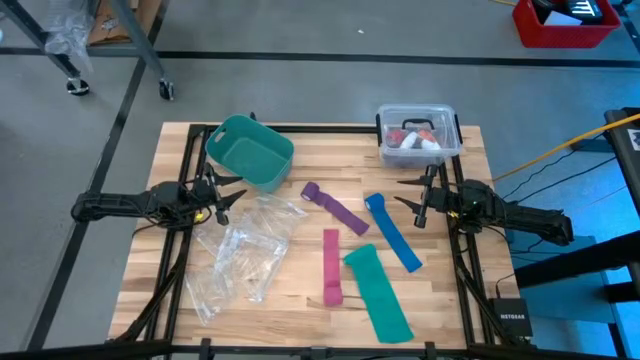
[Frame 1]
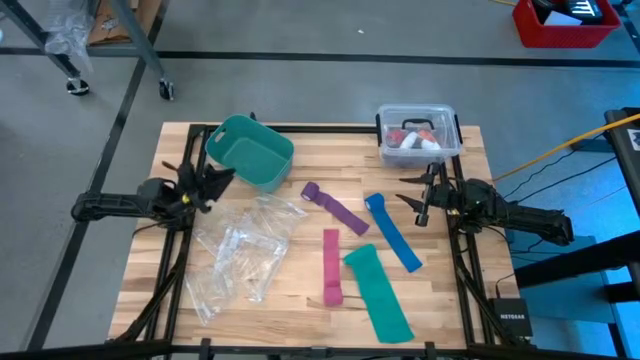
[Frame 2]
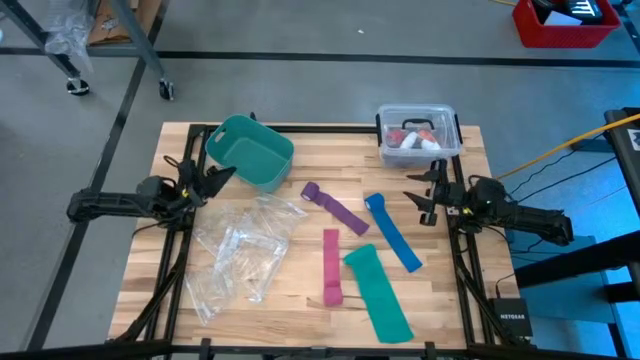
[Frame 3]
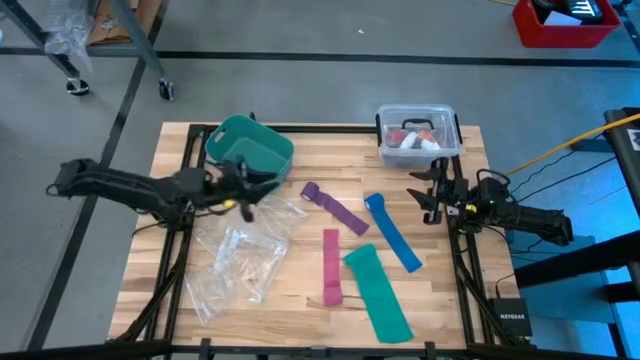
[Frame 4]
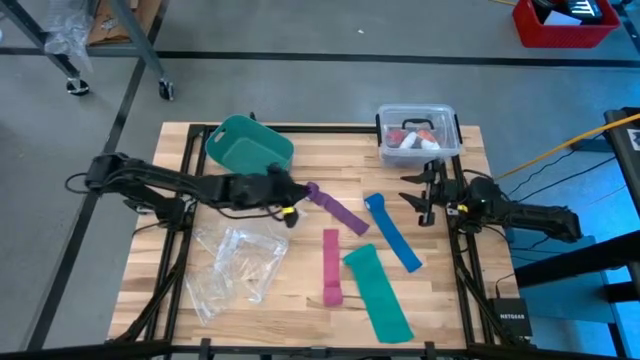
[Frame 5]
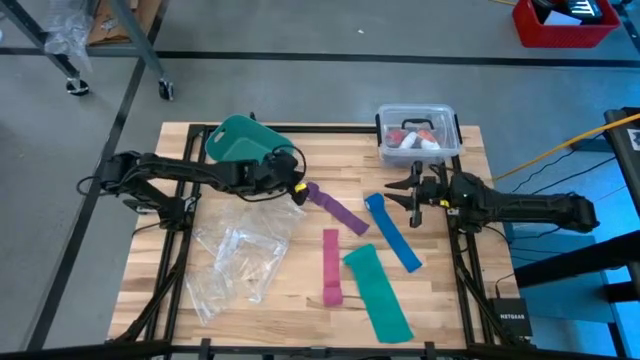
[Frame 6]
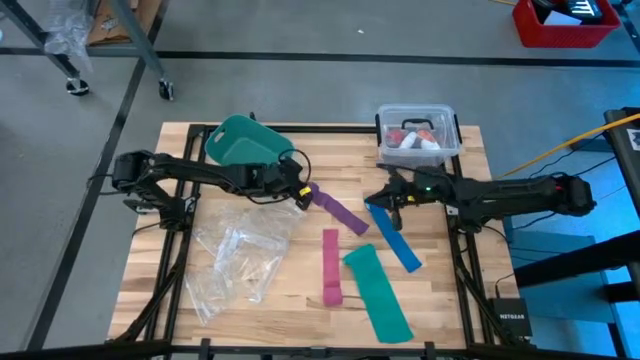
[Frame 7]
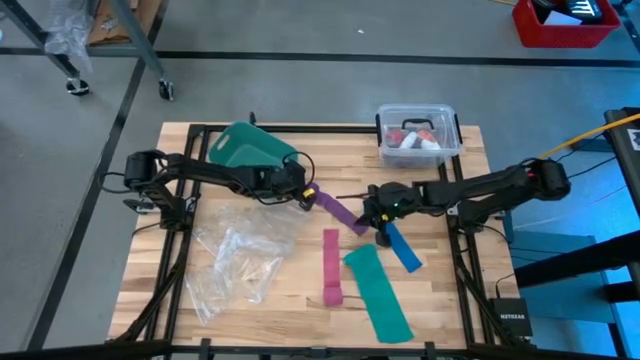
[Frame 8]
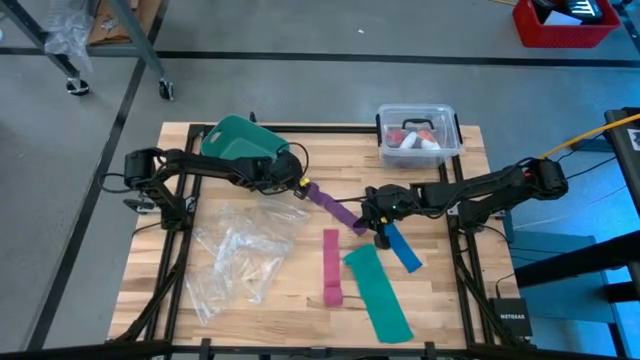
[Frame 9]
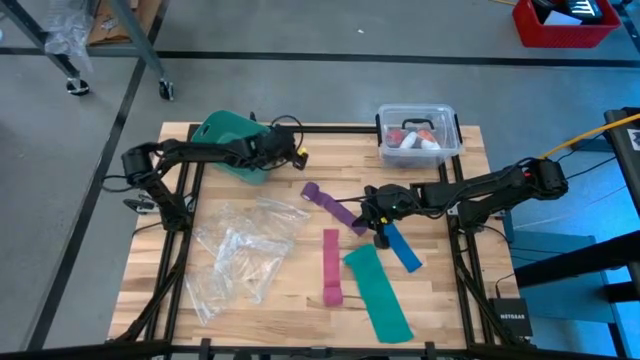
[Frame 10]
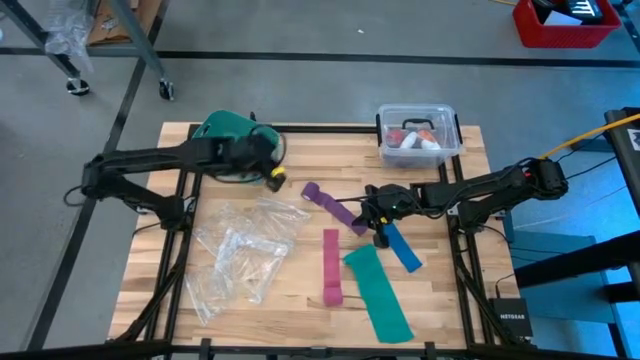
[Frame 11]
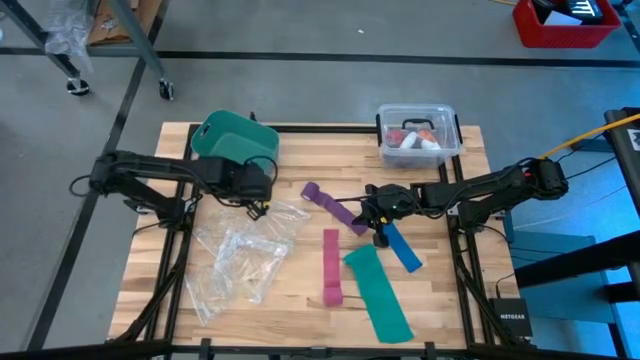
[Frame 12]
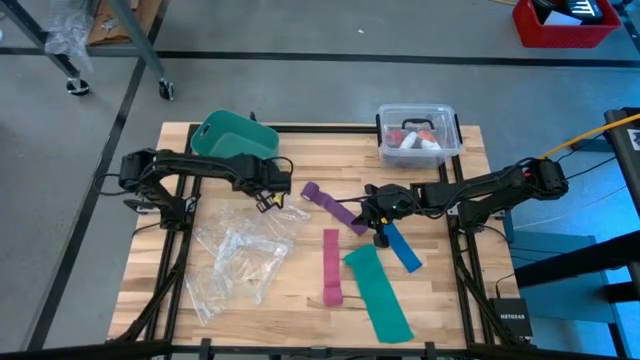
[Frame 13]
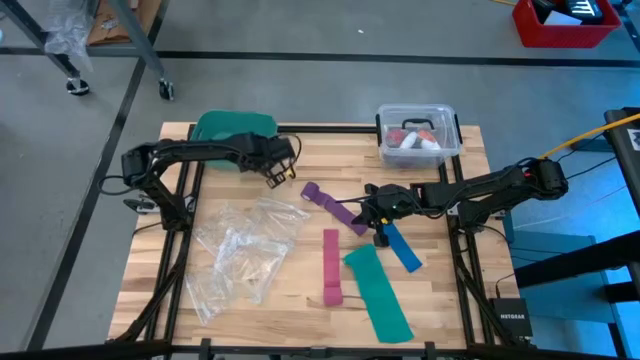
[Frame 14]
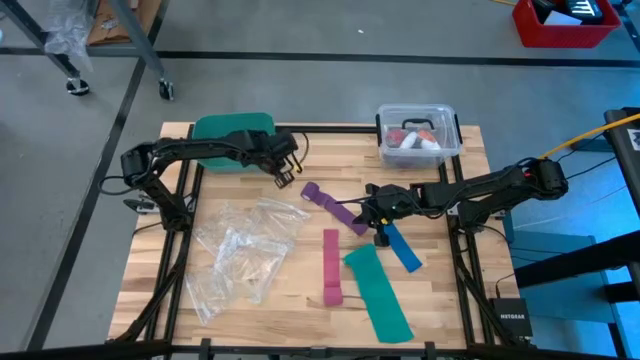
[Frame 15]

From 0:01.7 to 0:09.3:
Task: Roll bandage
Adjust the green bin

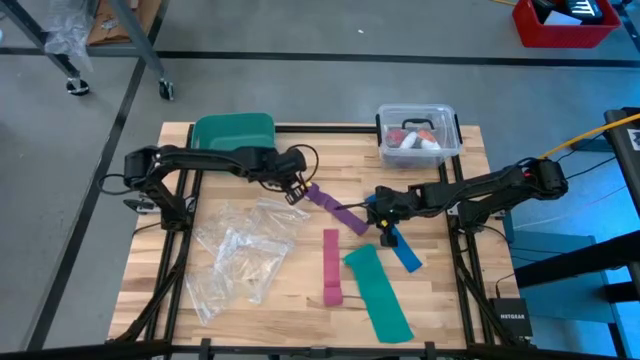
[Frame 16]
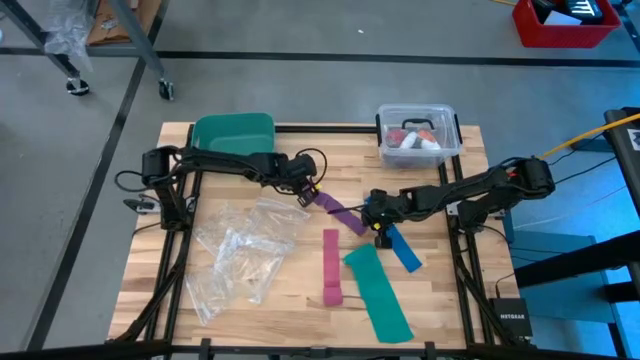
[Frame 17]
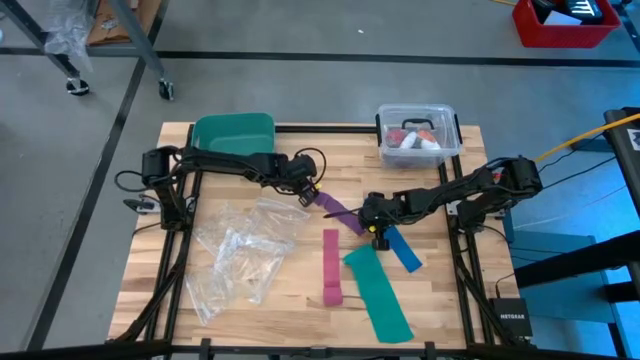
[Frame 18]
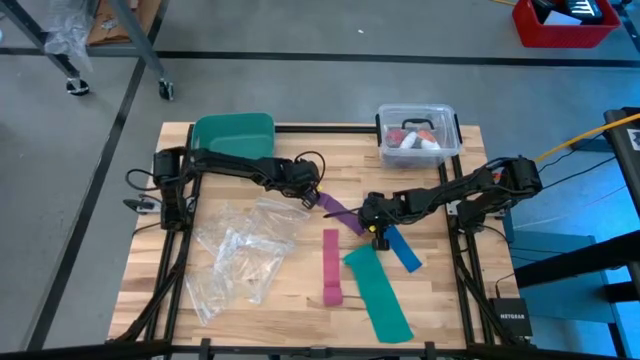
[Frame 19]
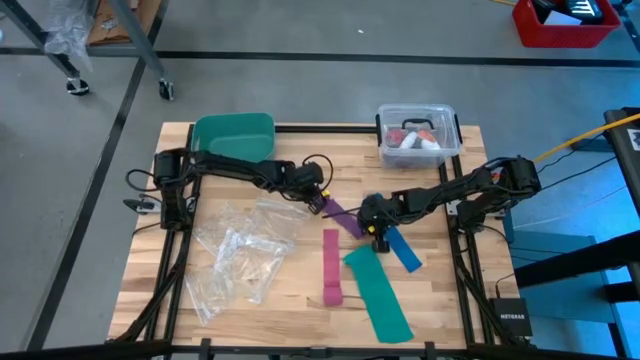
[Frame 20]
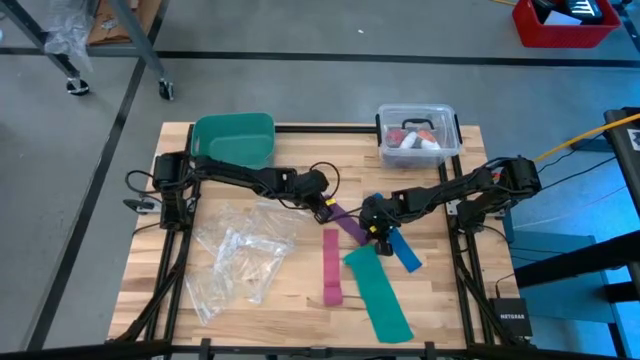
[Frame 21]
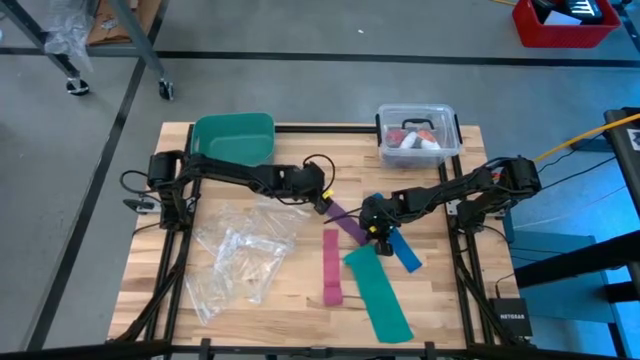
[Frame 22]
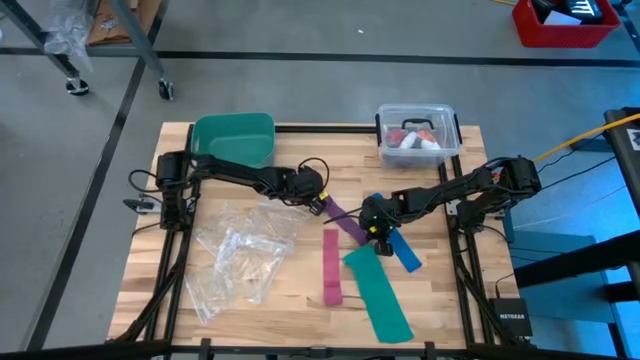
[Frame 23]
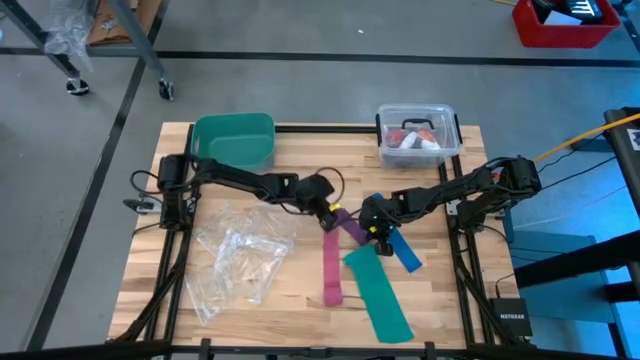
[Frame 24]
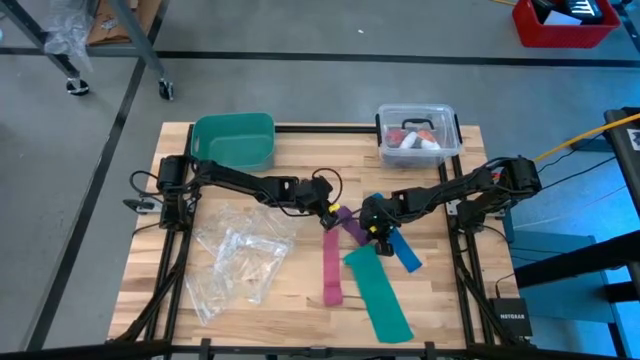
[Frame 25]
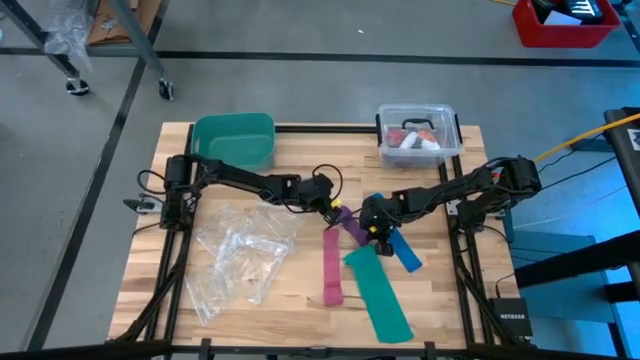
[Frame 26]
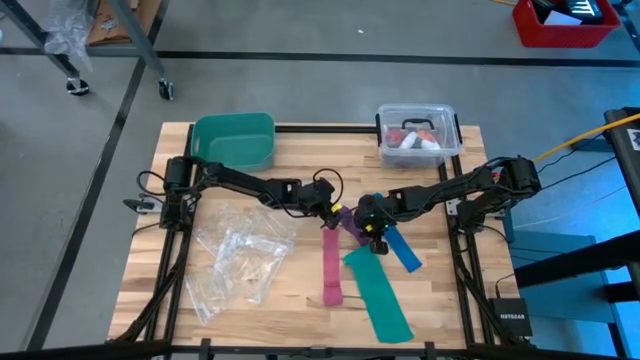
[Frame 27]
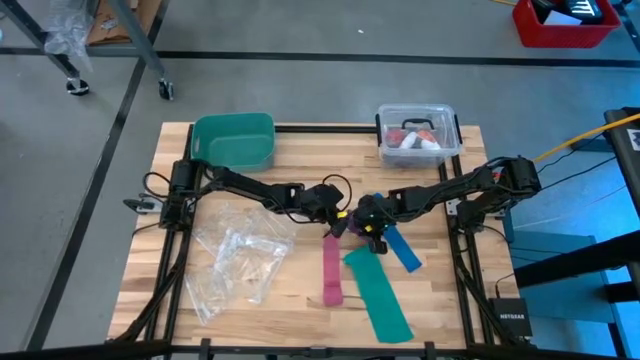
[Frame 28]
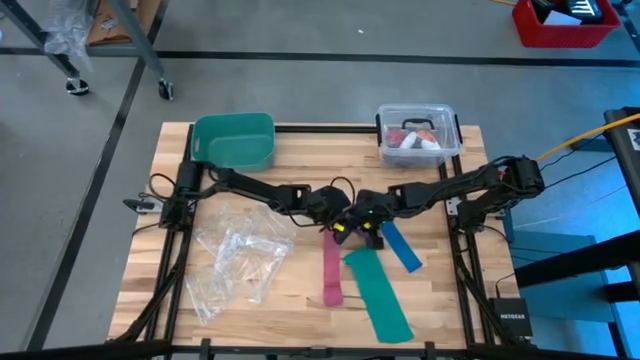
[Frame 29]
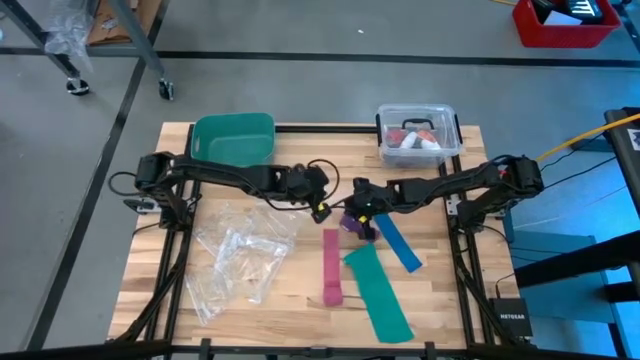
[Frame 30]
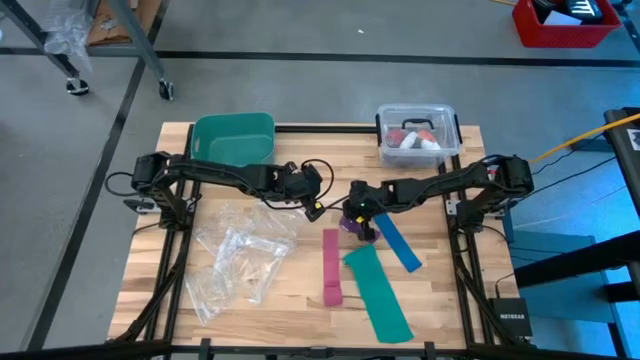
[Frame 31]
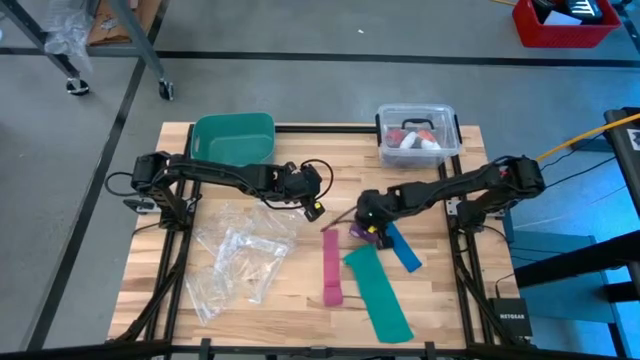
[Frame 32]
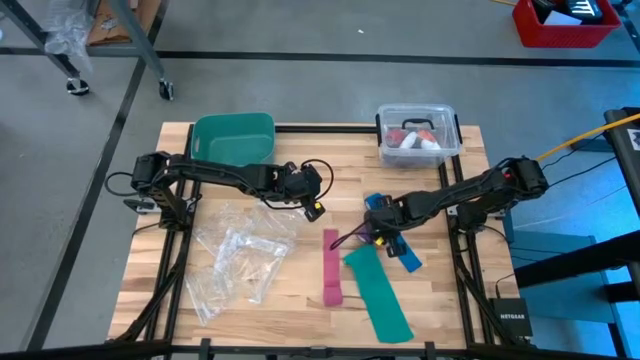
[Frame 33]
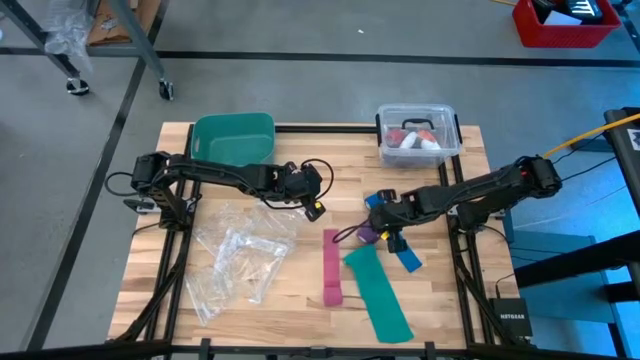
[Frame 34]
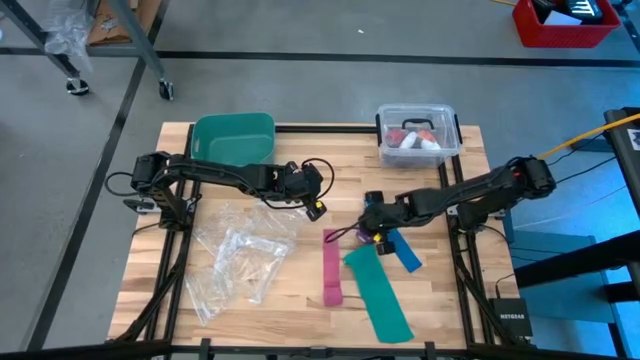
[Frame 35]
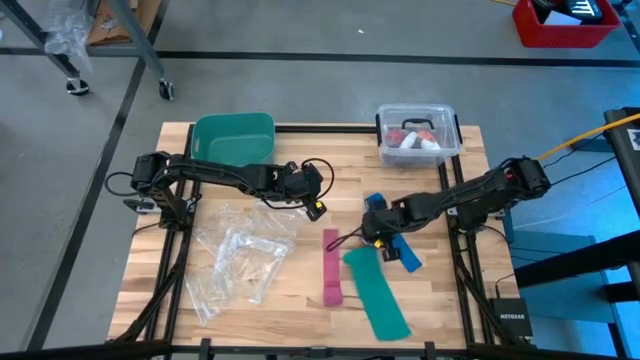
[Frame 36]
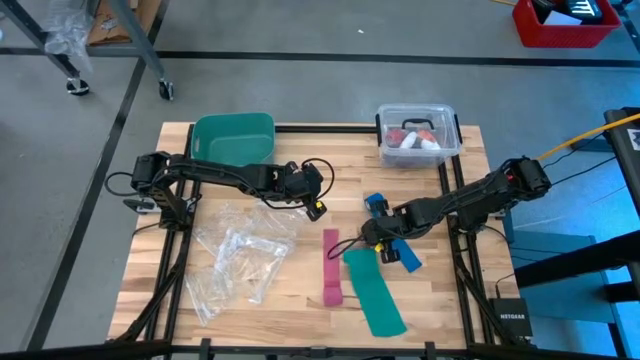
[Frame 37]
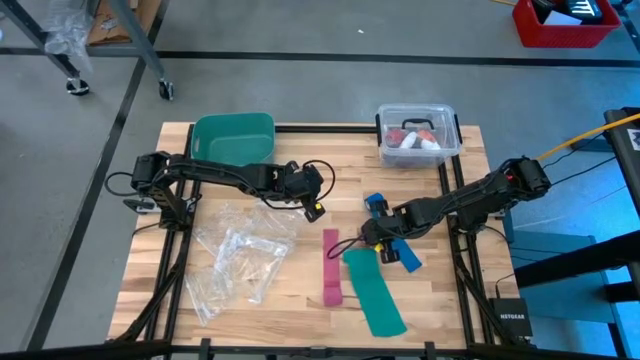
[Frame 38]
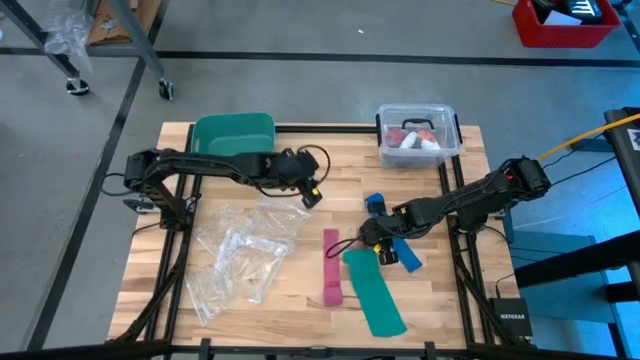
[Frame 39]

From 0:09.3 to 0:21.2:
Roll the purple bandage
